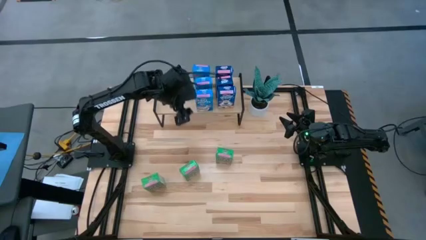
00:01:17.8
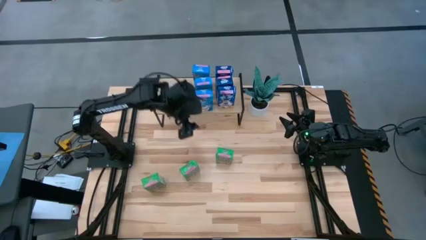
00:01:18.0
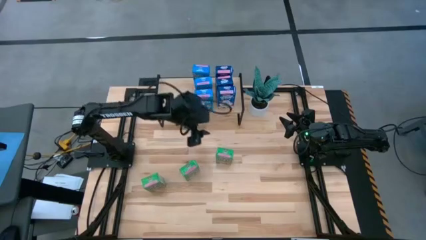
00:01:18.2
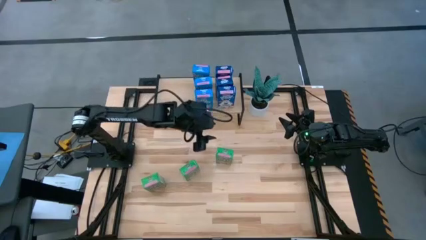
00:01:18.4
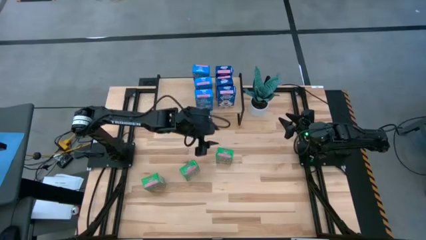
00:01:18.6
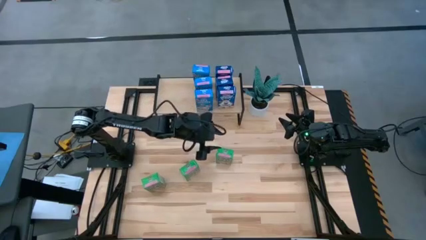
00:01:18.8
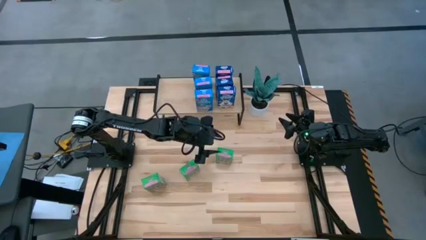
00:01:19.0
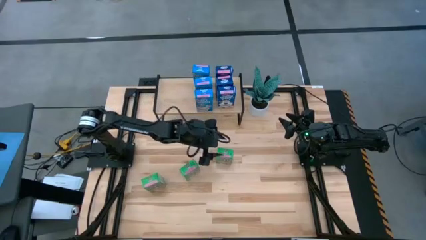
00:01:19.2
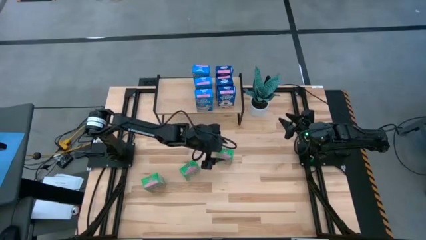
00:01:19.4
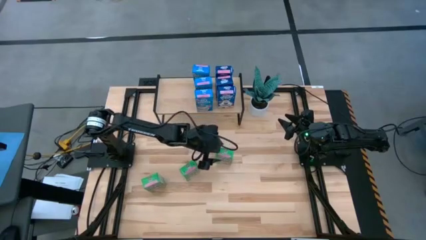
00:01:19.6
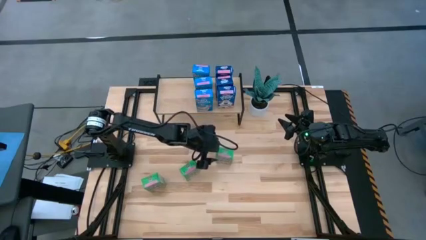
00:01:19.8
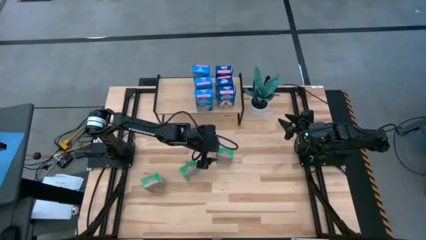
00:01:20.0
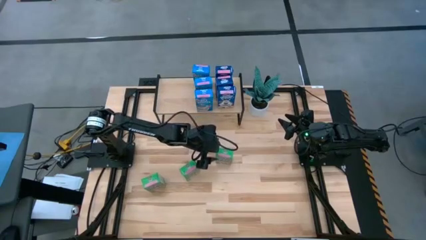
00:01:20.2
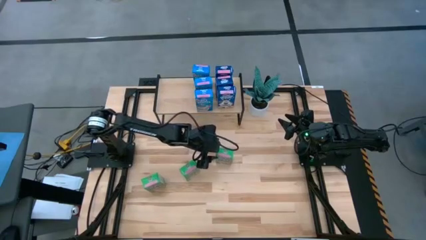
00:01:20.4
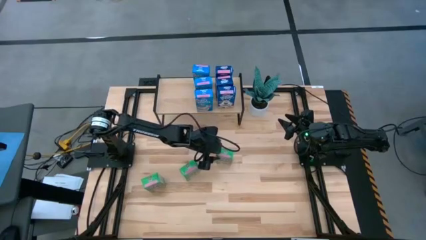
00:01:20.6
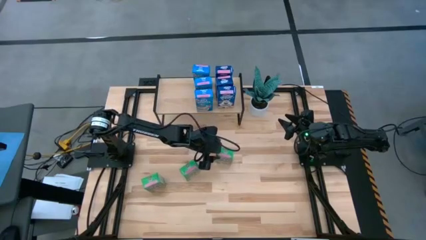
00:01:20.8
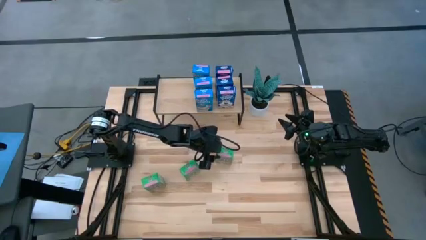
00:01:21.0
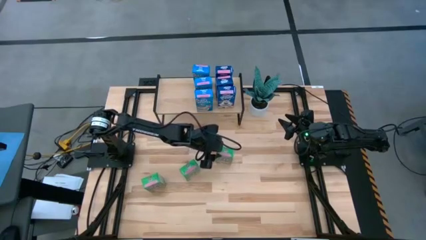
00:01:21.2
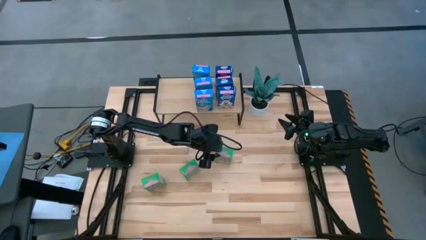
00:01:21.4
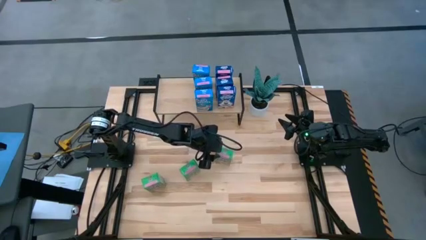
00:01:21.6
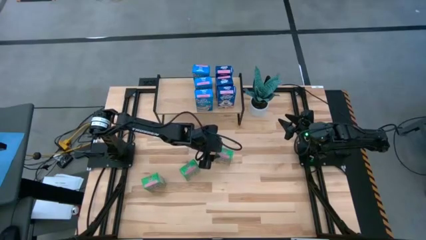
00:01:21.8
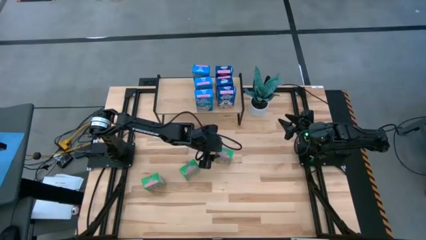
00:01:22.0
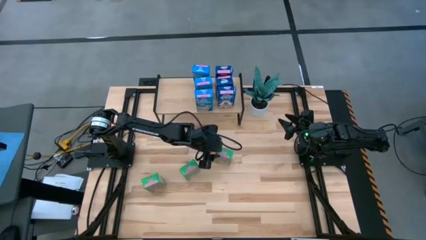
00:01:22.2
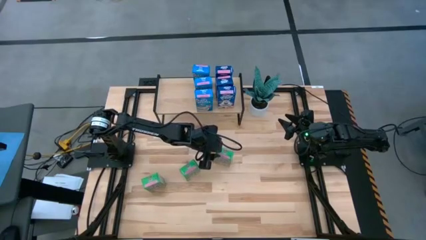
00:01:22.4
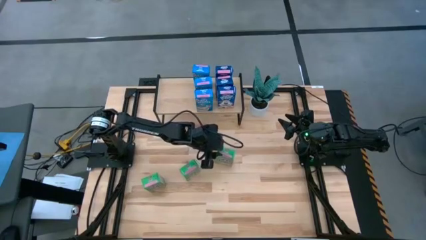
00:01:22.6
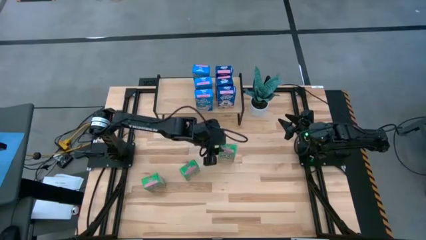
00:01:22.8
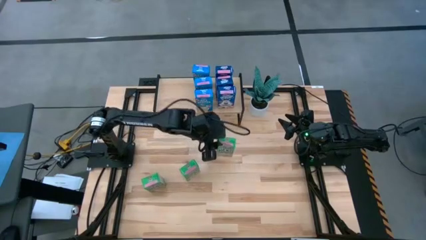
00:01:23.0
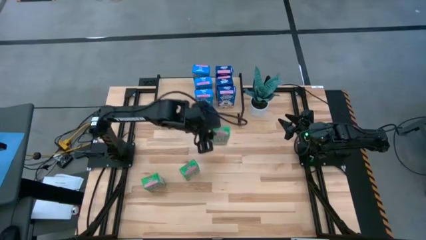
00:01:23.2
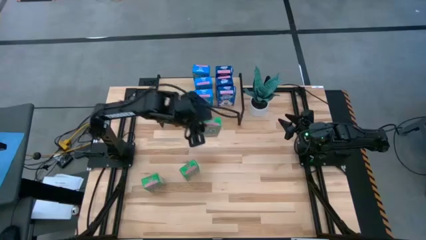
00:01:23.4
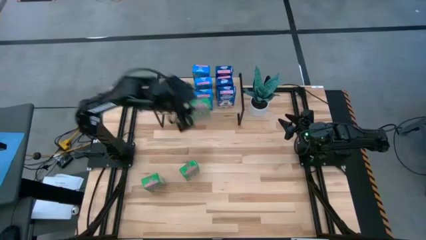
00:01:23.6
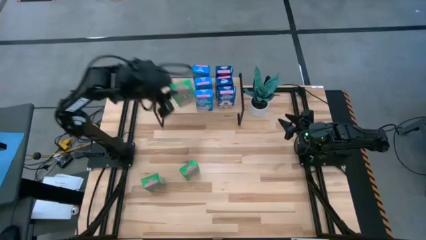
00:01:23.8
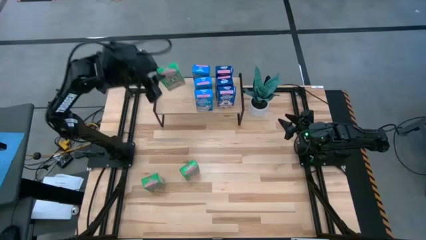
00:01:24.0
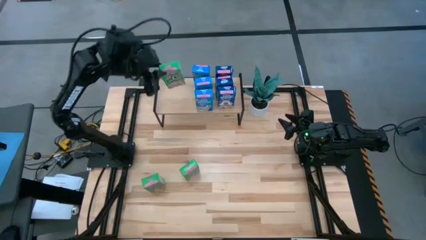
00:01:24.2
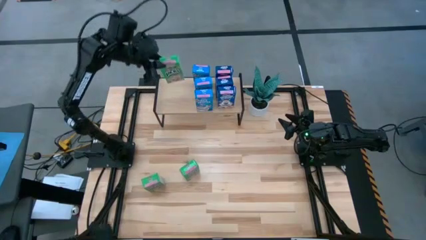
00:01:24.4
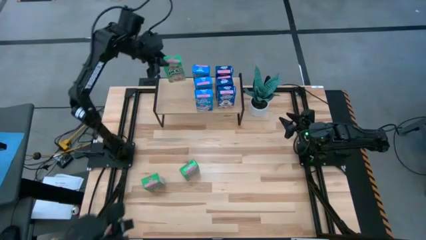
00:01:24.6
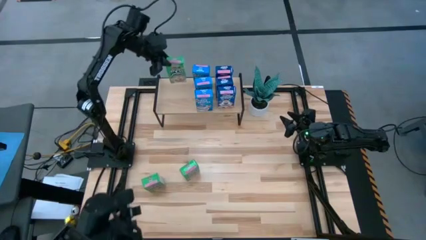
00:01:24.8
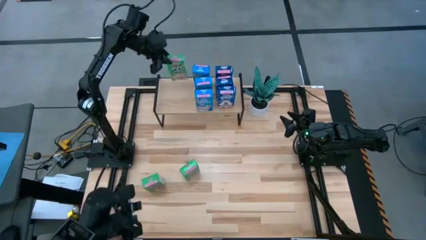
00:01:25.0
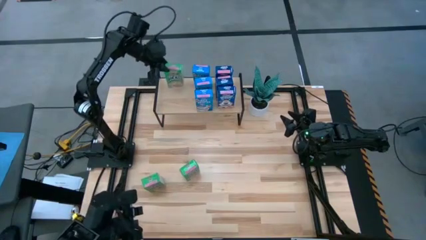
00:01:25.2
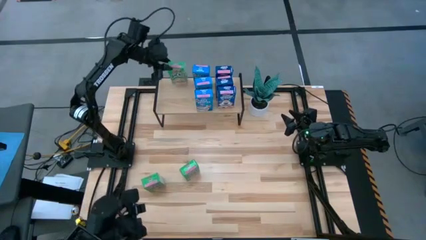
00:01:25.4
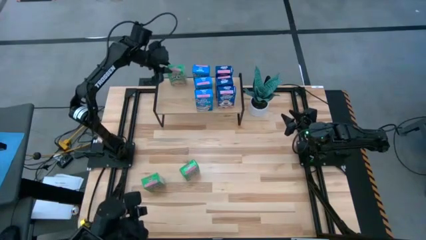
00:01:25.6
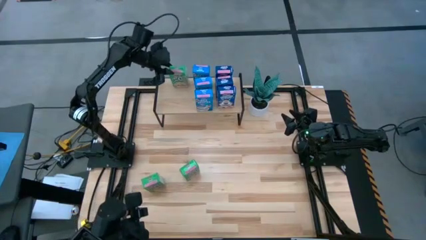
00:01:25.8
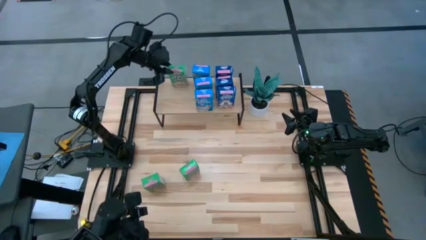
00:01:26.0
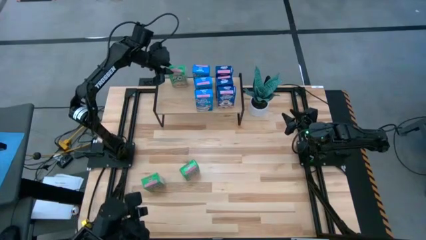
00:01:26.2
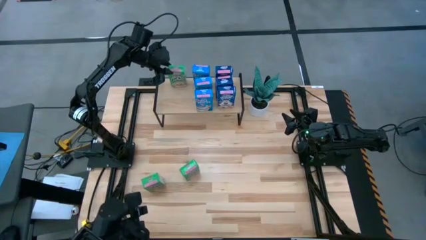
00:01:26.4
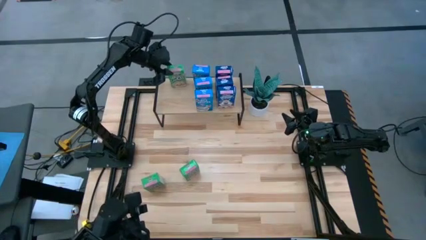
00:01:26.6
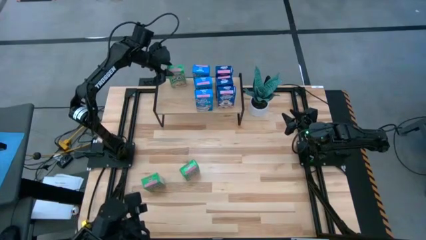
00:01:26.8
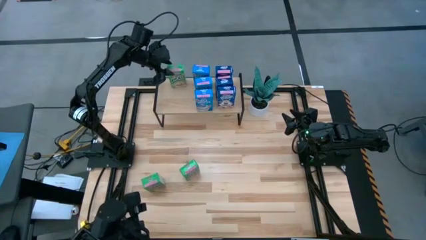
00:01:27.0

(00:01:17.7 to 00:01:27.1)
Task: Stack cereal on shelf
Put the top green cereal box on the shelf

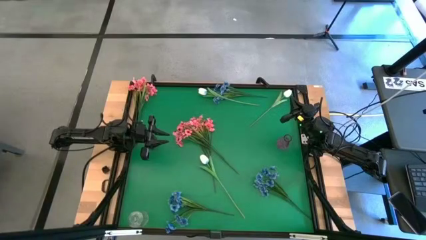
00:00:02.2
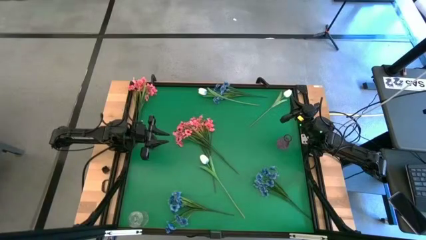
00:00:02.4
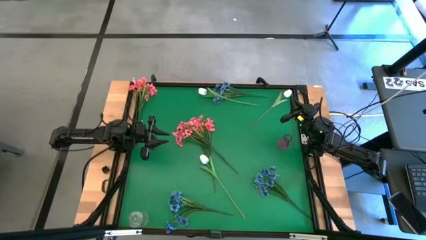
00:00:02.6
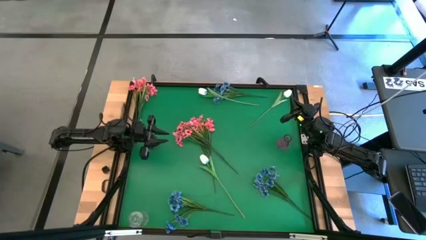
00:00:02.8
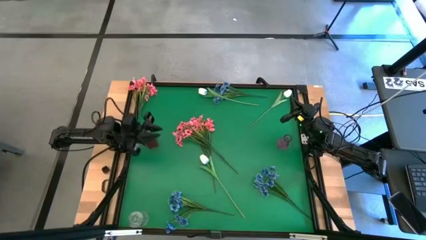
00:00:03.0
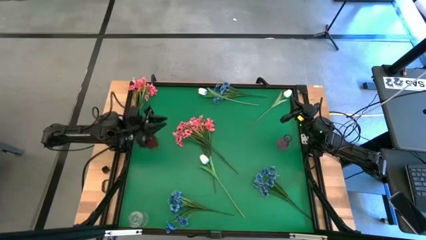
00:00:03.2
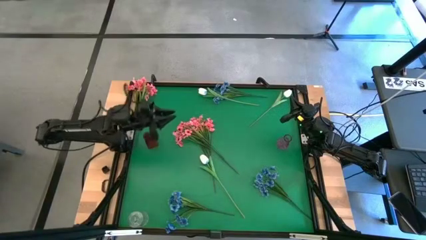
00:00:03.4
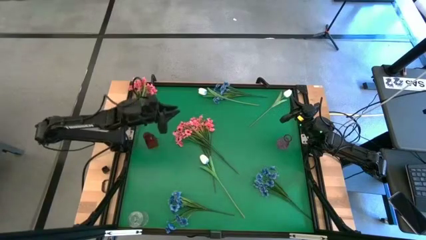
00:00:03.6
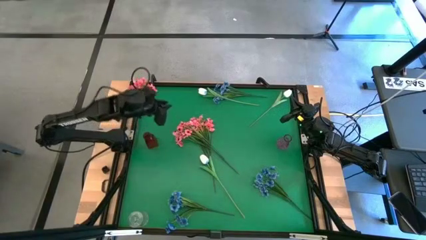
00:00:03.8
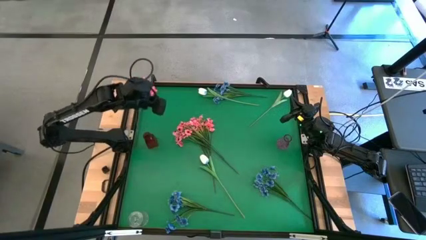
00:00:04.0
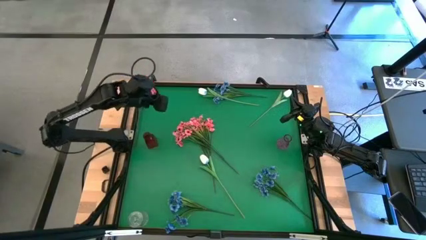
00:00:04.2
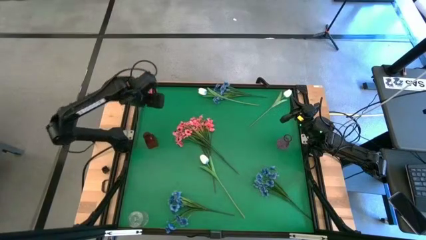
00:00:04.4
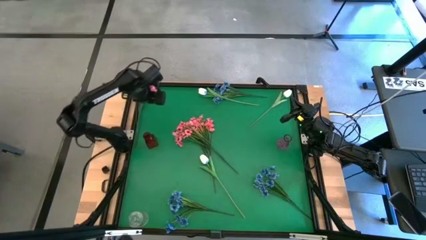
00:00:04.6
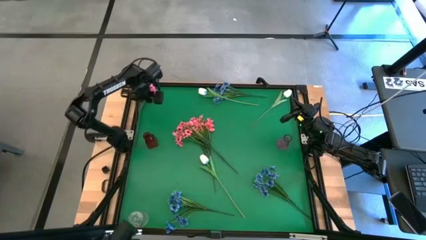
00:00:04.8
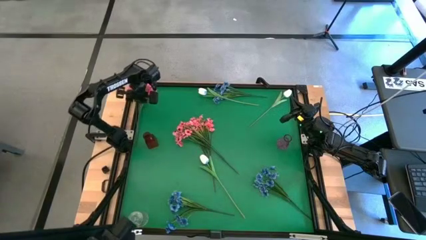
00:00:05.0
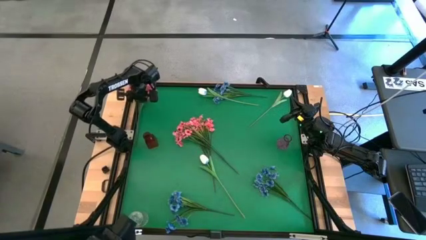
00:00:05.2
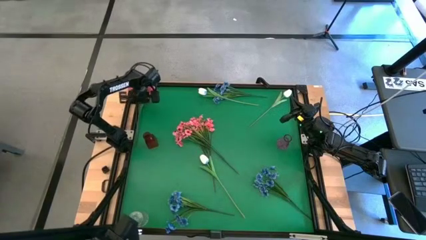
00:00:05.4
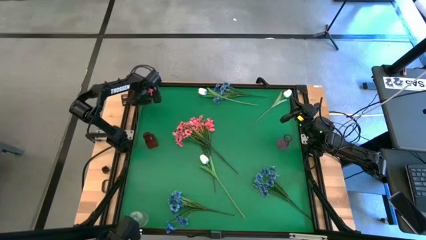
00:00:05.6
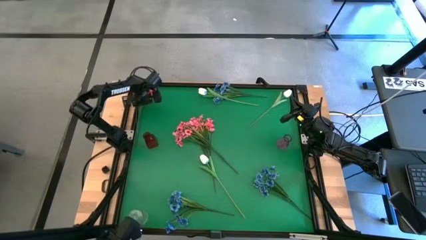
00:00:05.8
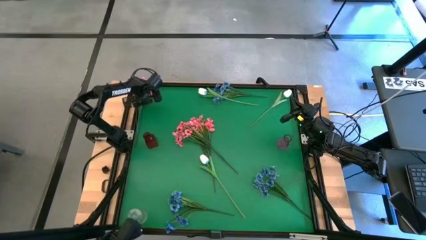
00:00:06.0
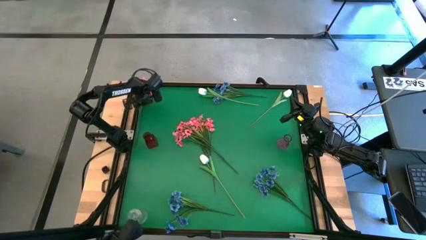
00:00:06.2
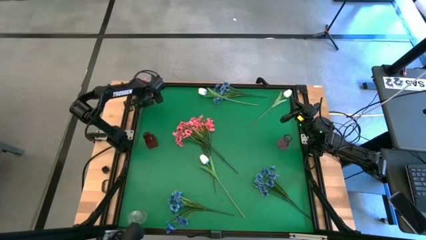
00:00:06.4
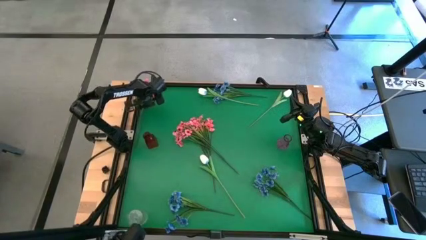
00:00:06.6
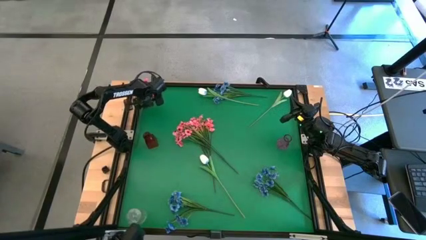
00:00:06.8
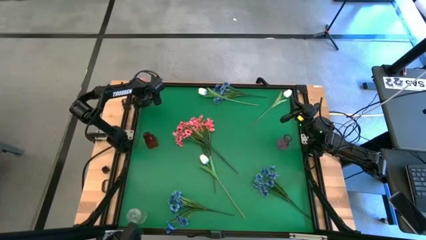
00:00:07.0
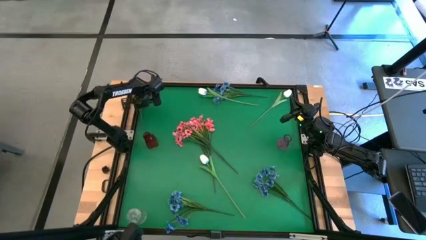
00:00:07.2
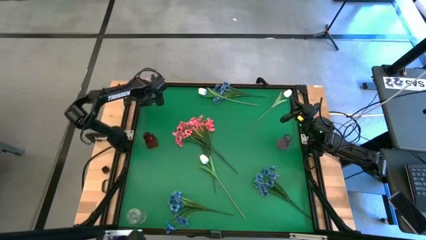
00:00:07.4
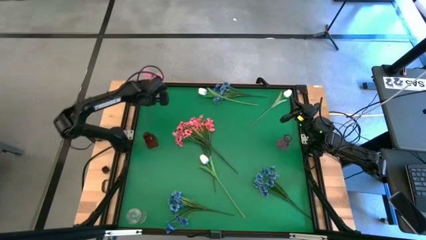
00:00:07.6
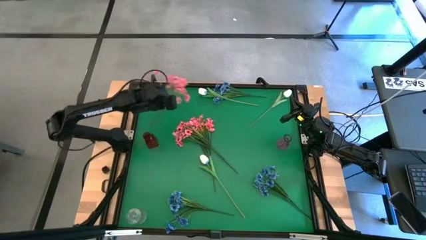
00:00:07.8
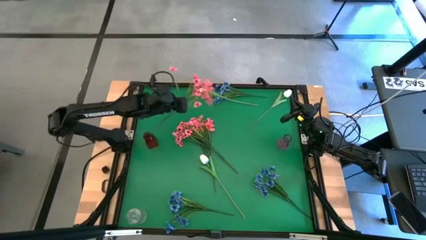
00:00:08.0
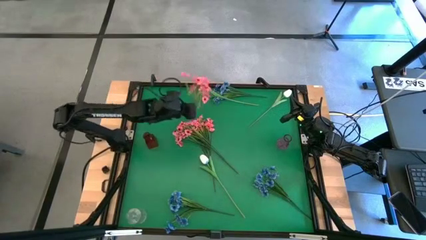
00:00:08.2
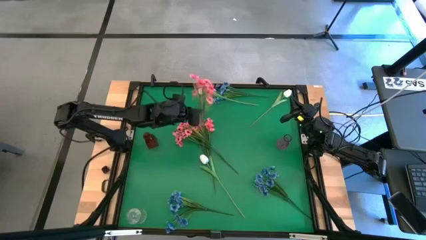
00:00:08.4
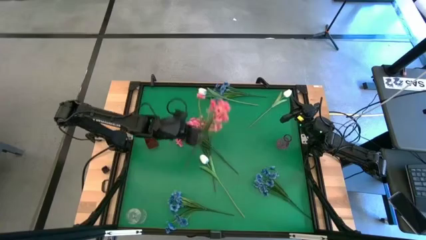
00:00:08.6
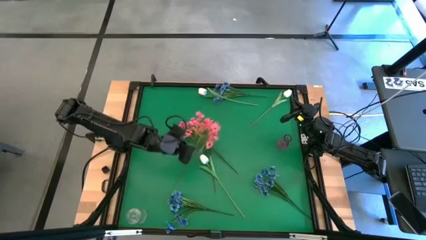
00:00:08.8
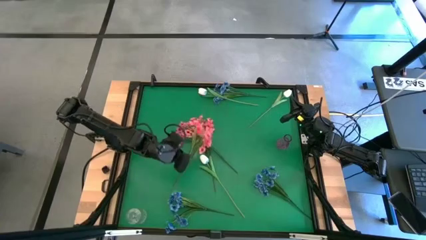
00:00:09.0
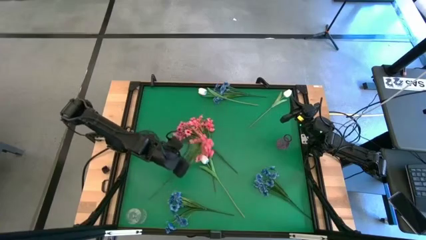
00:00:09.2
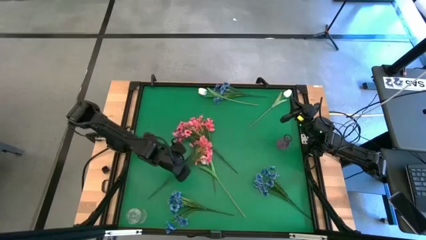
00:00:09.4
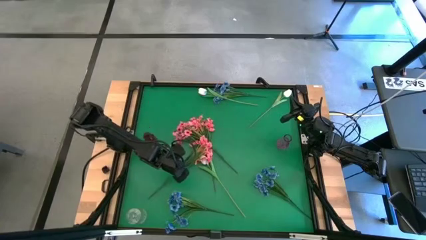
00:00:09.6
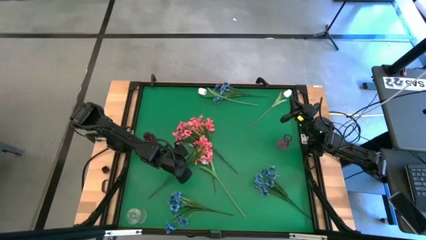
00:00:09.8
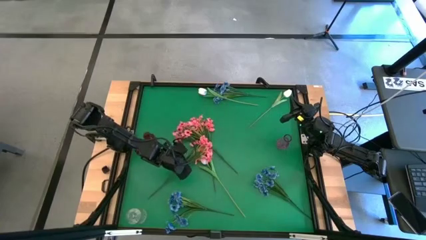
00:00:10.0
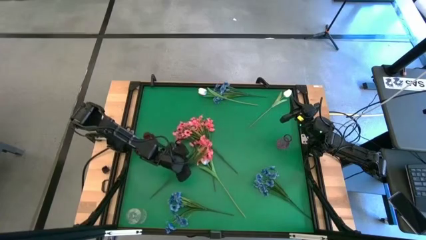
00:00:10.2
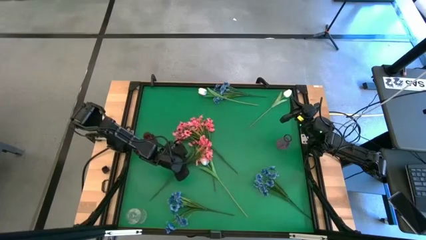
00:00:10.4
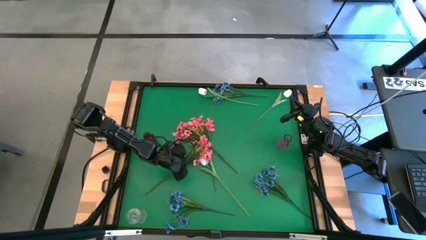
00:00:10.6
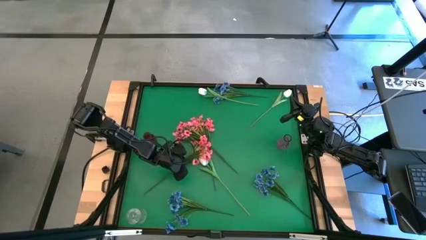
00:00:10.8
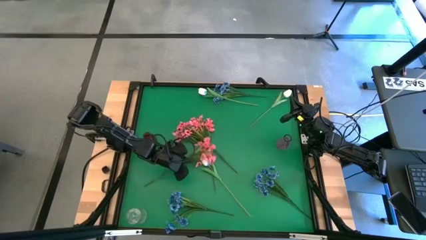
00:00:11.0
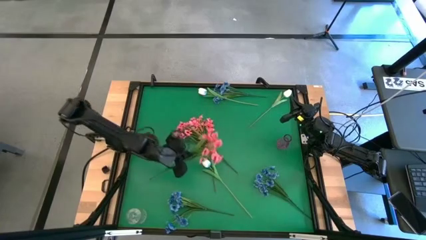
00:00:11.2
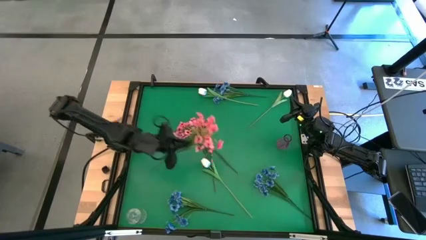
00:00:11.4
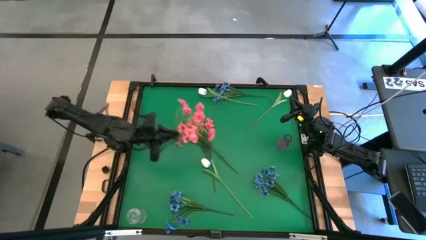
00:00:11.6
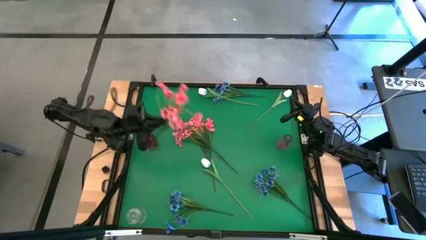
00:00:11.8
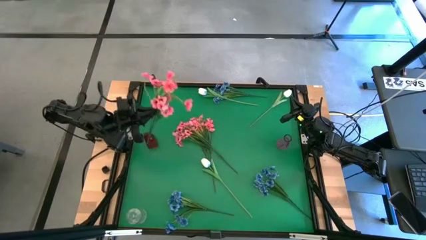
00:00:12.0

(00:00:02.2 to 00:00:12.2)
Task: Sort flowers into vase by color
Put the top left pink flower into the red vase
